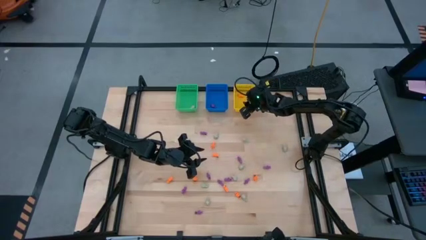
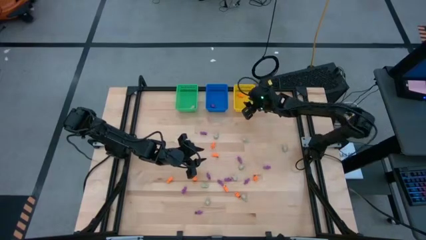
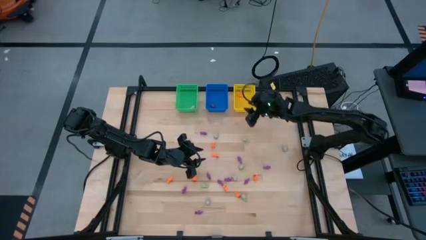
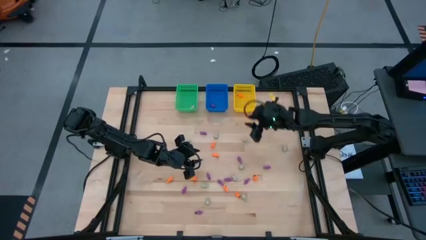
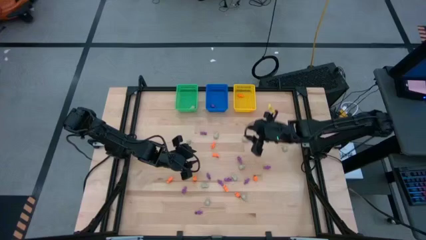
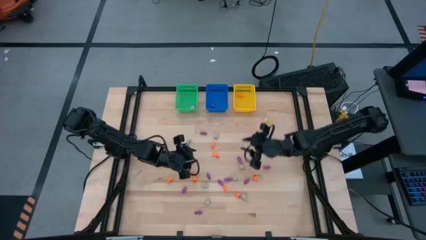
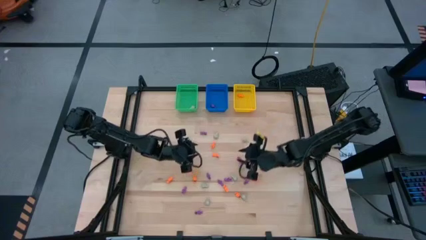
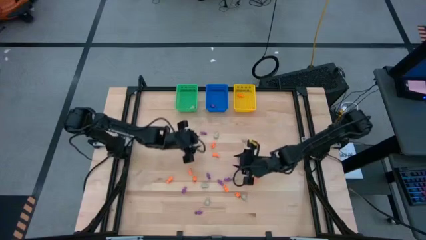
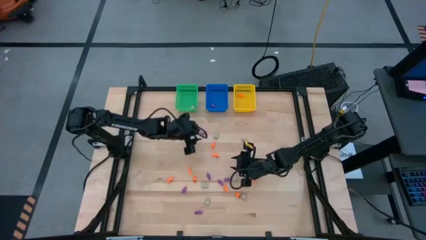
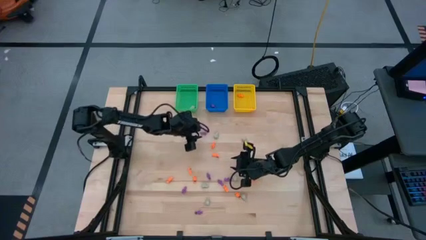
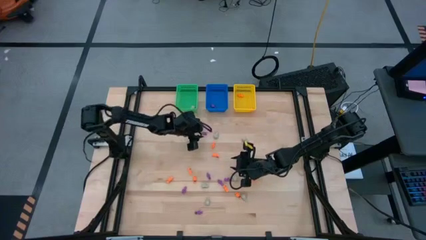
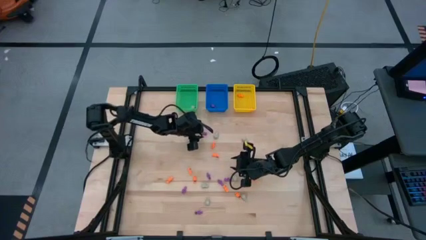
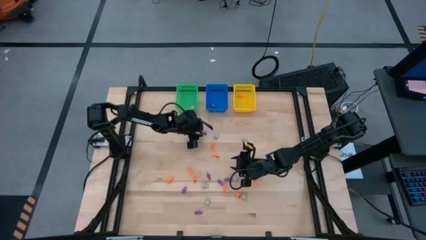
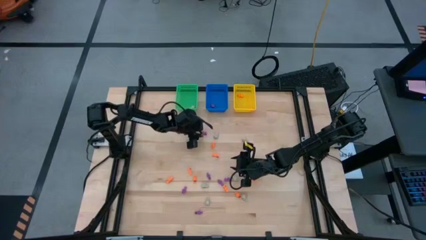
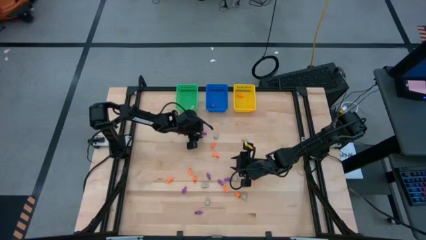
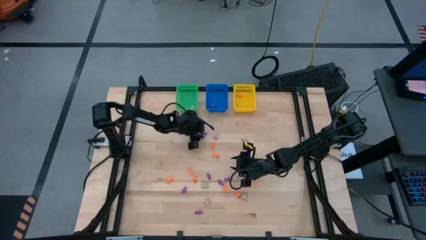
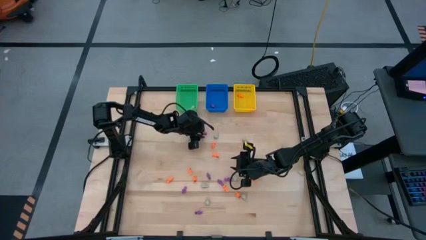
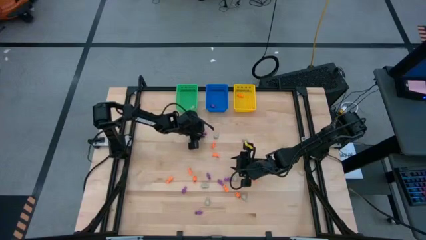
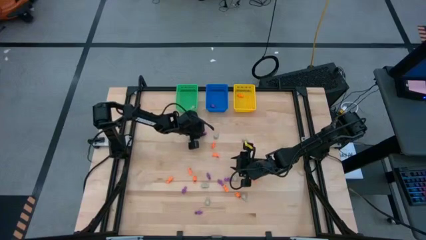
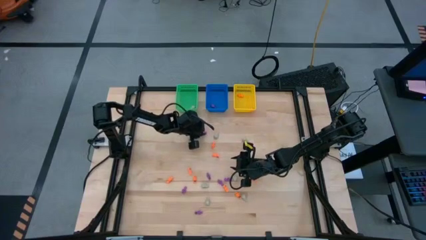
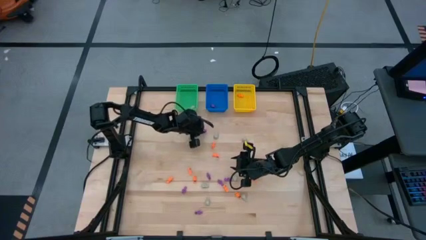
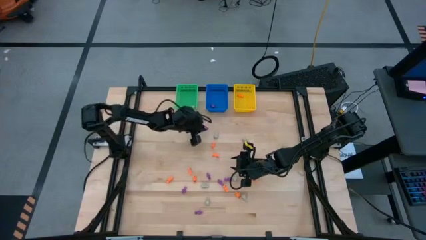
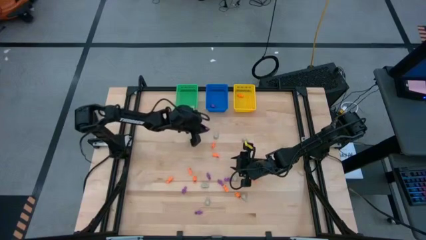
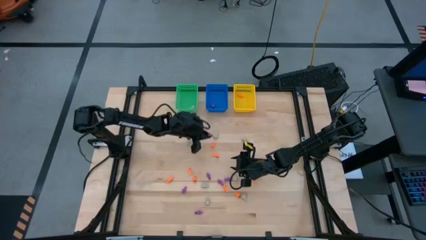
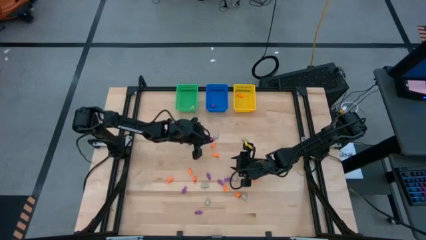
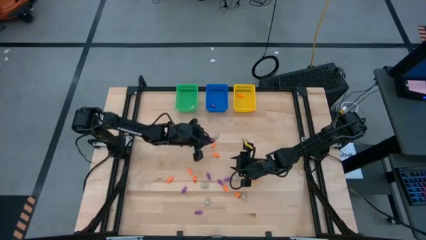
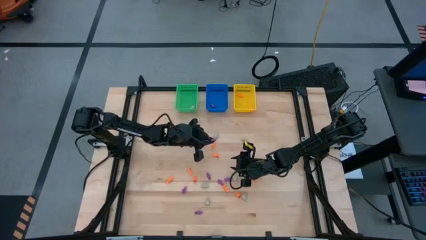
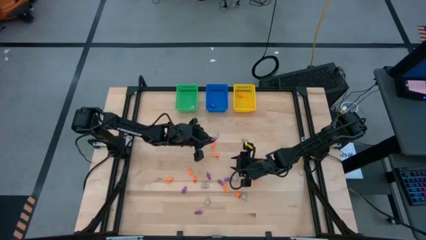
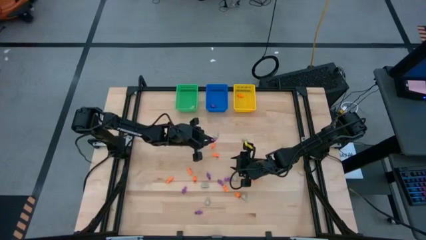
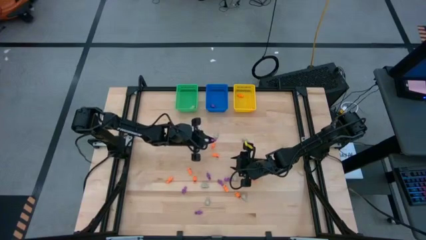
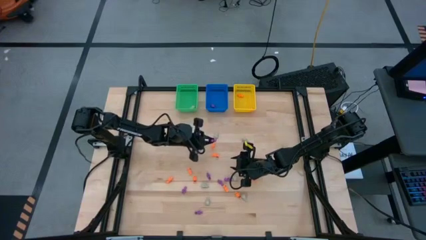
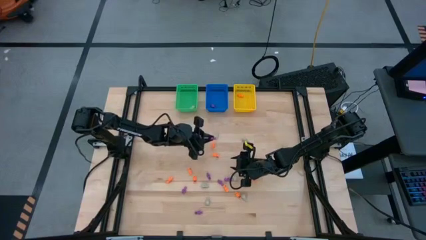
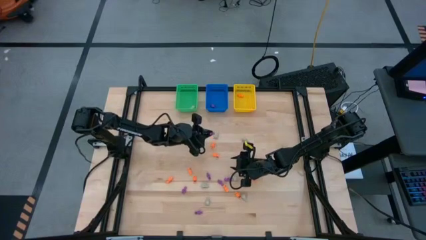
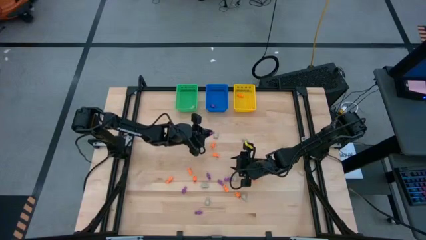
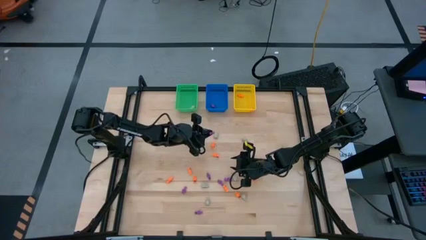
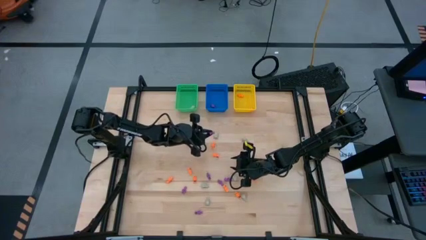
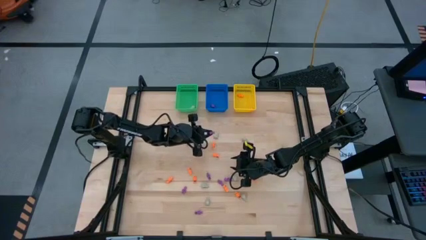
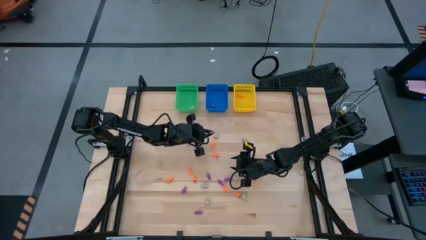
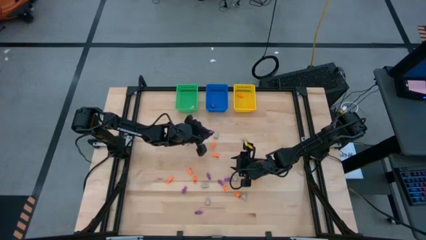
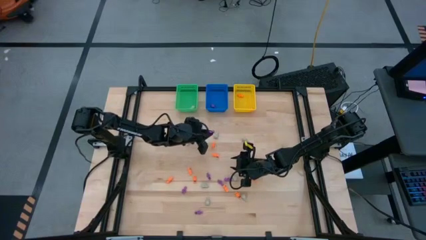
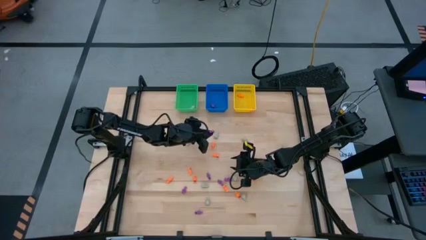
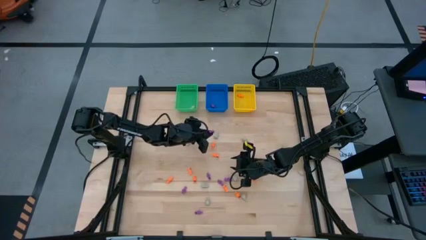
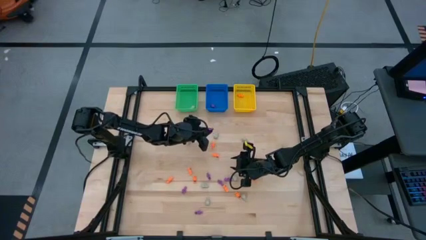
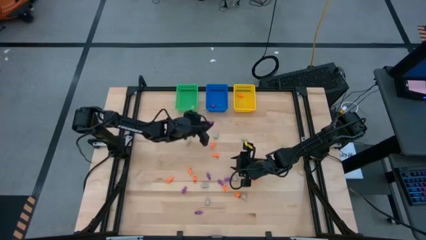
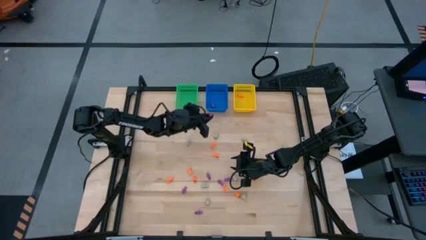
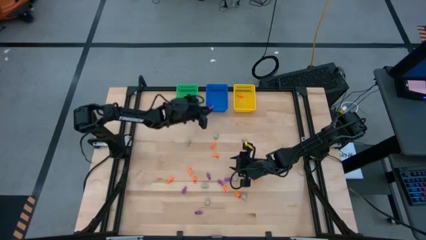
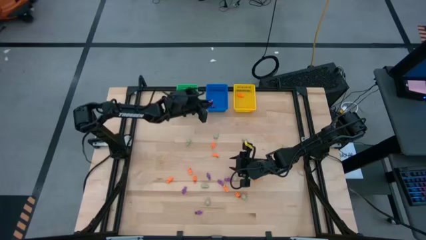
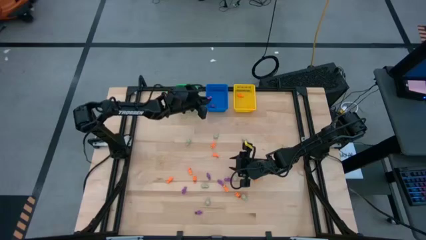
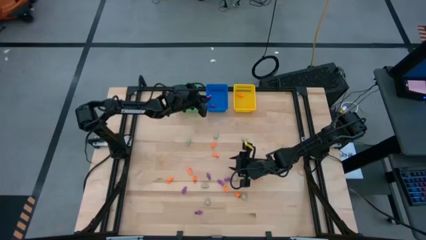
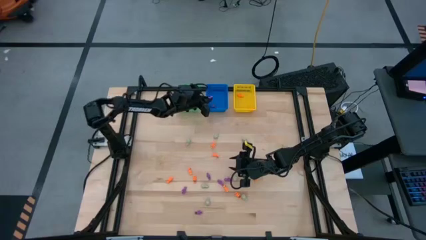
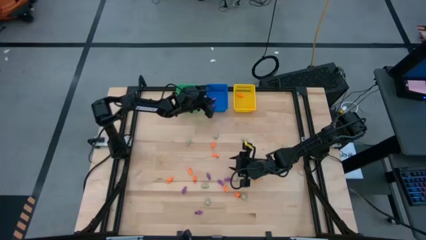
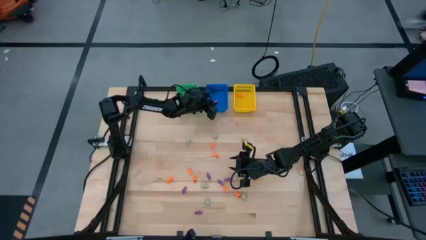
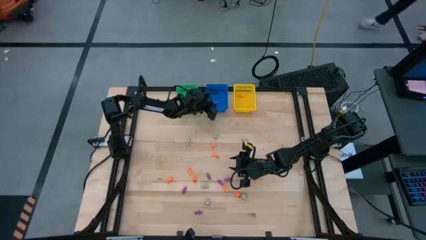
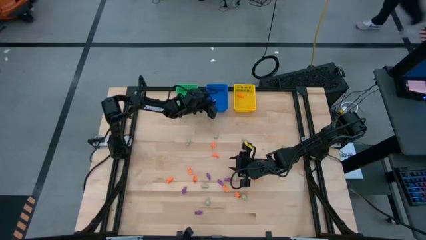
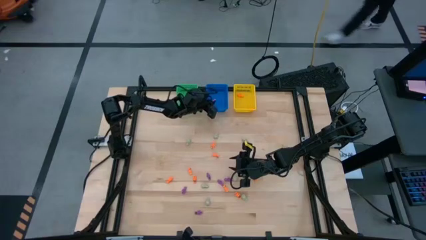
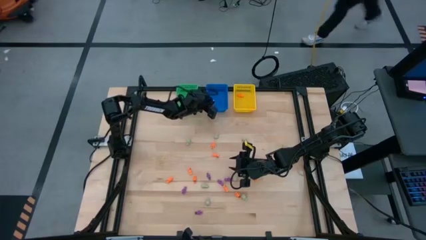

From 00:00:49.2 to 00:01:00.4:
Task: Sort Halloween decoration
Put the purple skeleton toy into the blue bin

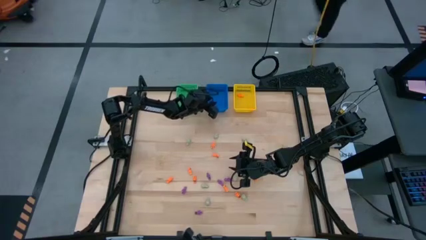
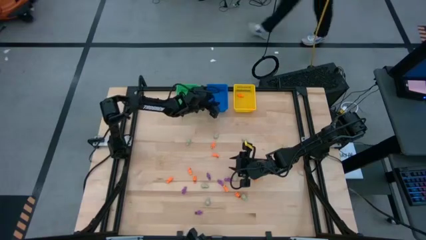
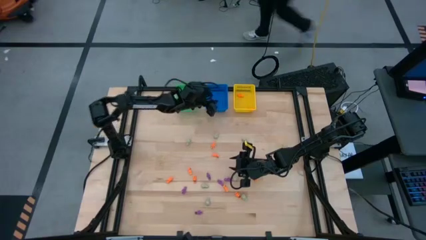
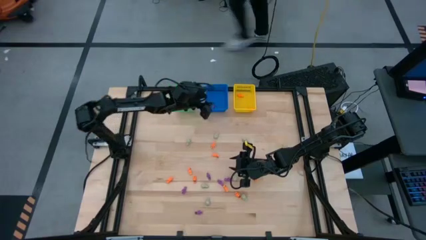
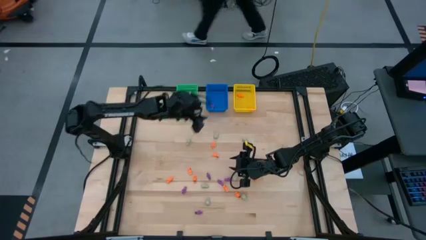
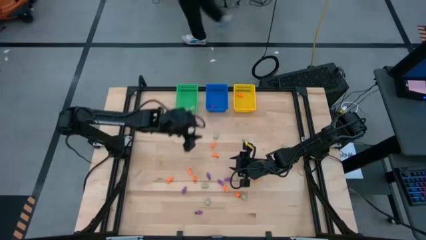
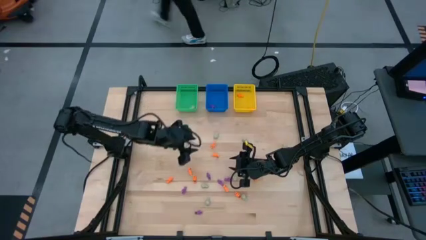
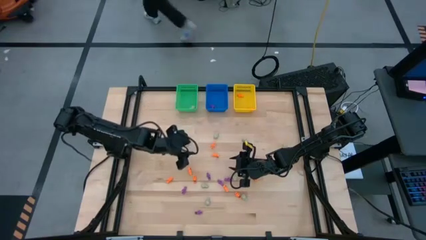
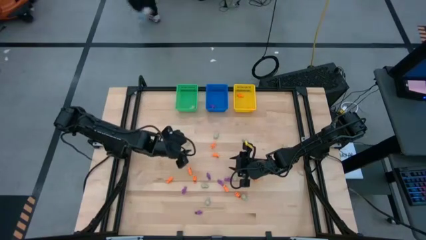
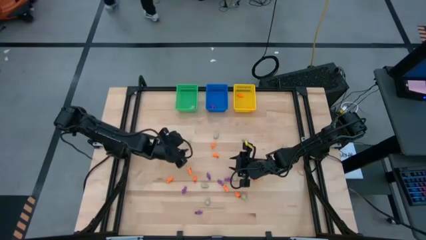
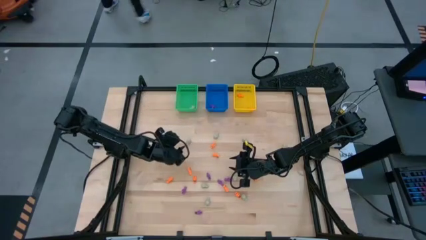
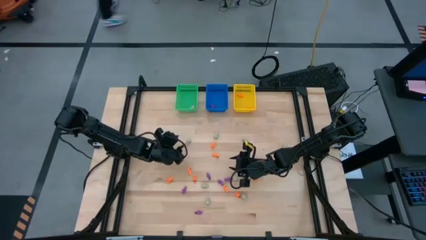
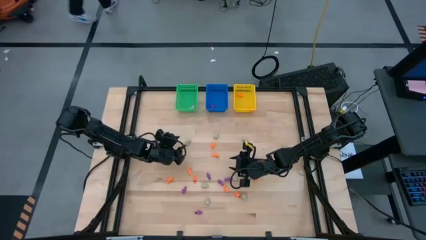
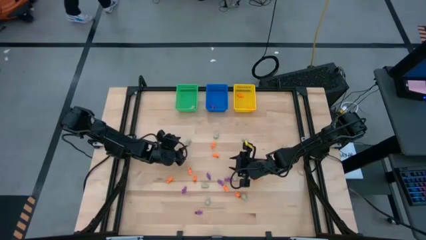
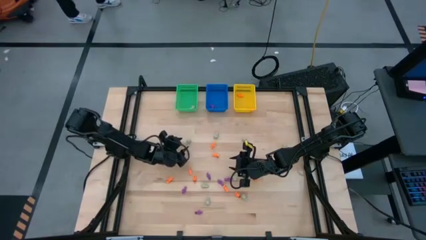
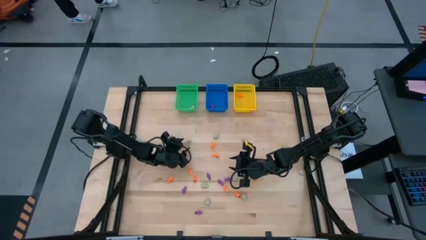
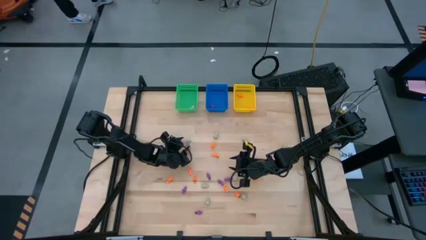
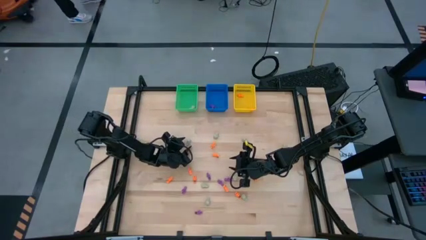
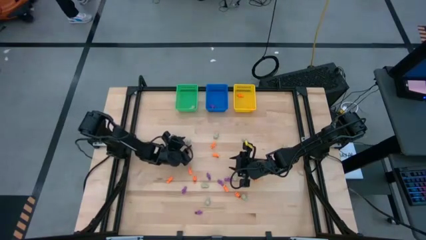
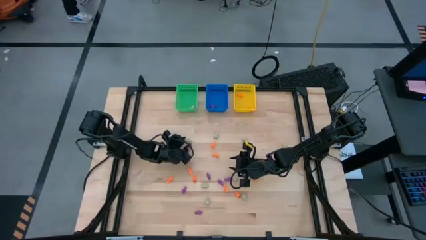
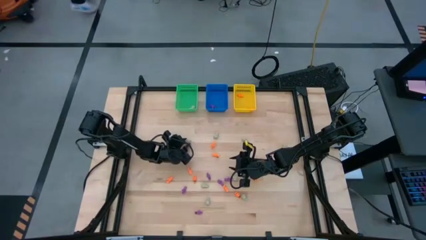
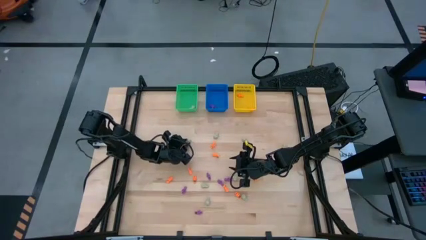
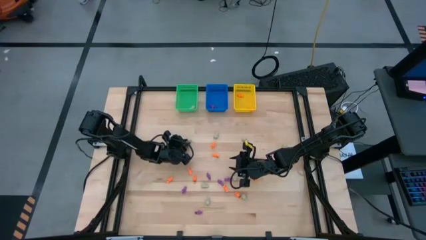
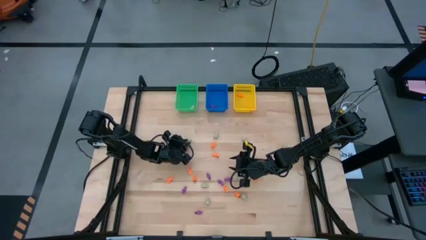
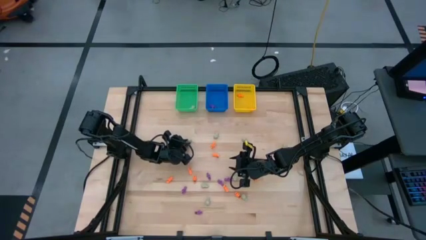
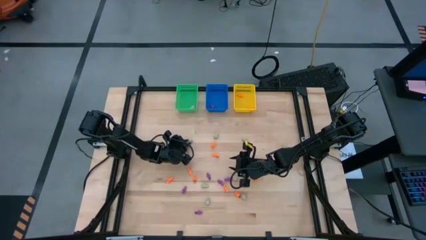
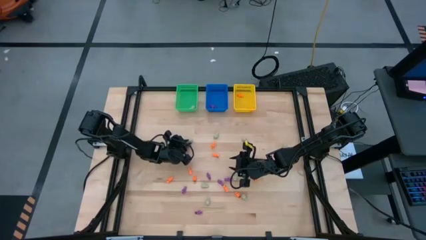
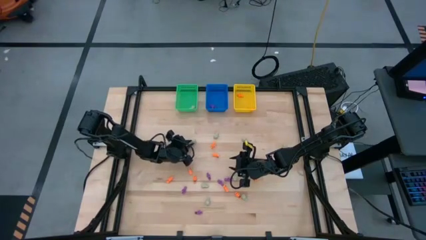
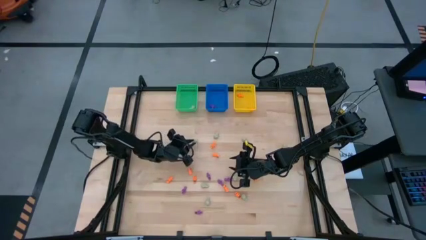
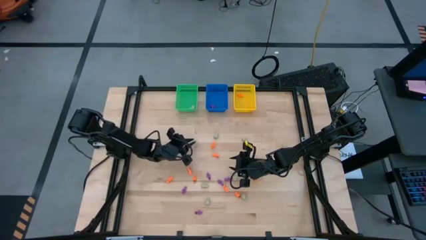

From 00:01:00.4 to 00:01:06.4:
Put the gray skull toy into the green bin
